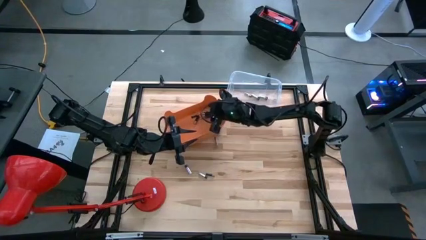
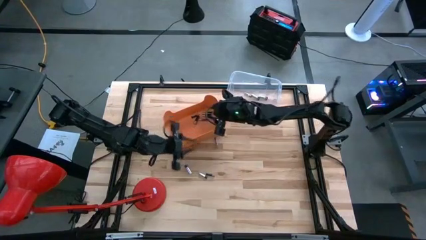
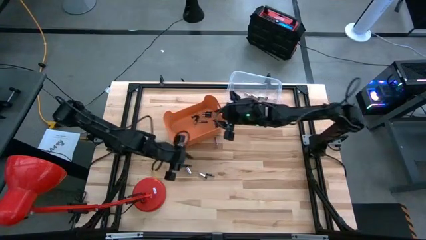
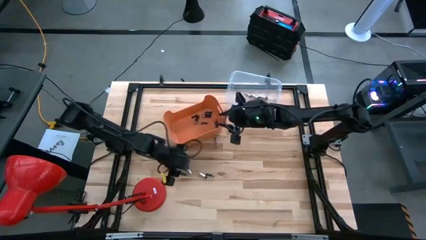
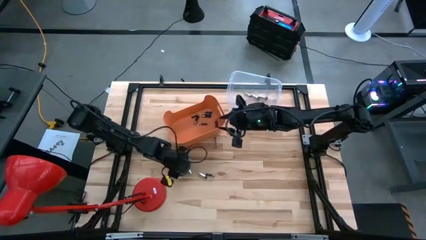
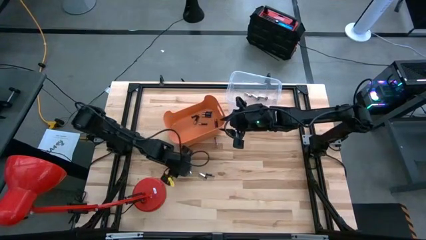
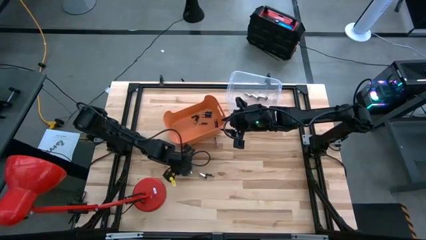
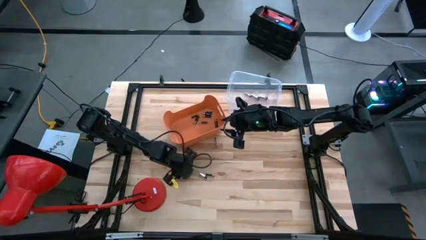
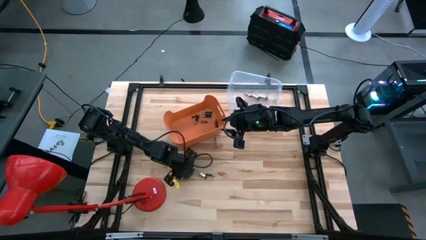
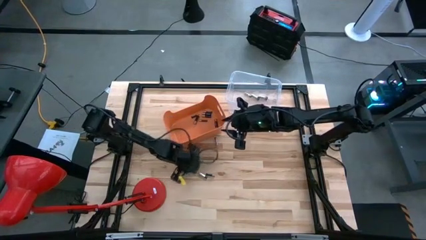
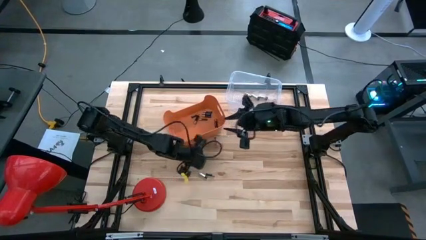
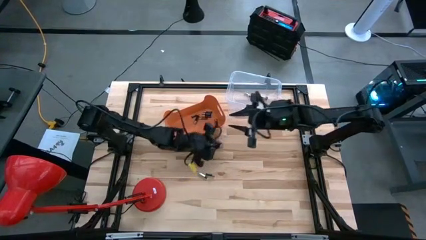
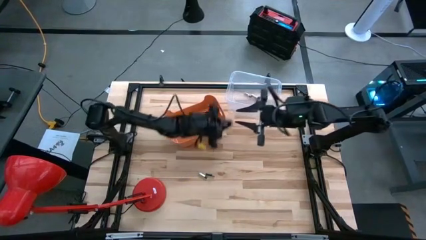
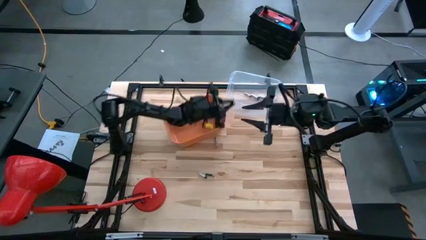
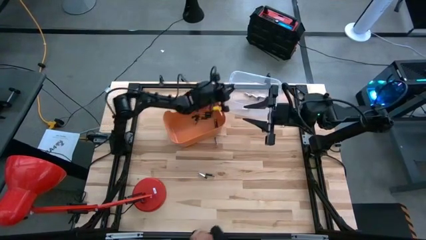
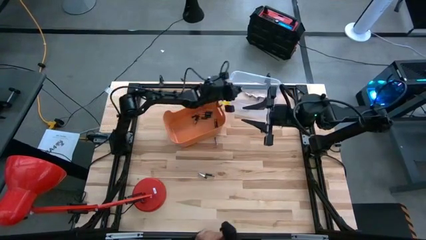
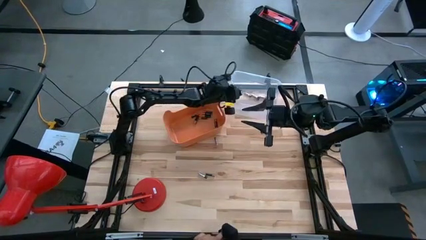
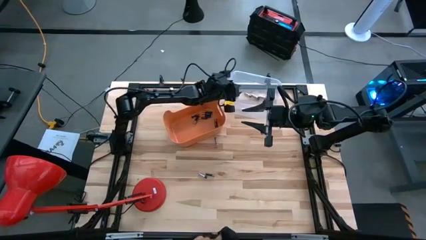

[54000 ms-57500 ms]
Task: Sort batteries
Put the silver battery into the transparent bin

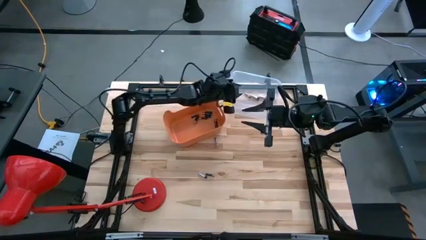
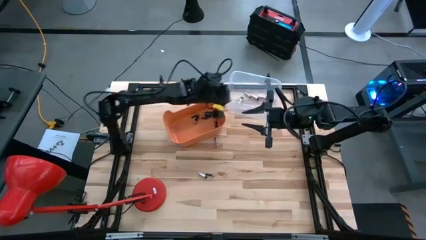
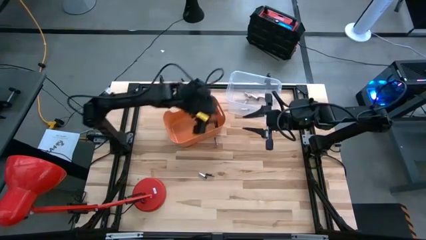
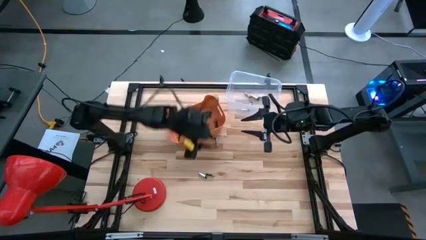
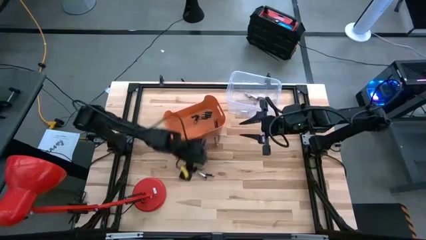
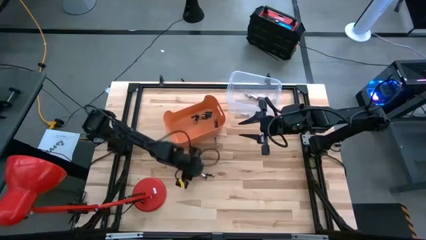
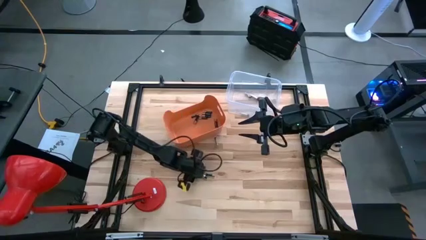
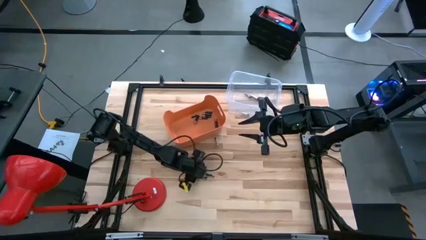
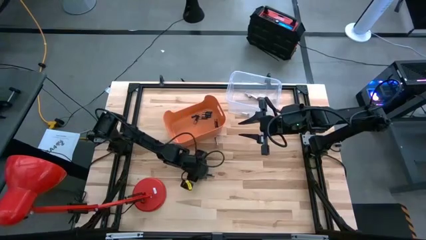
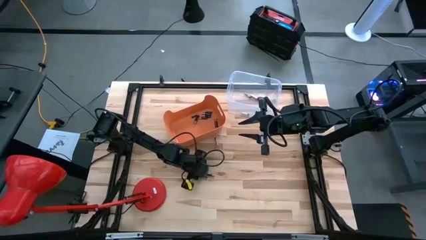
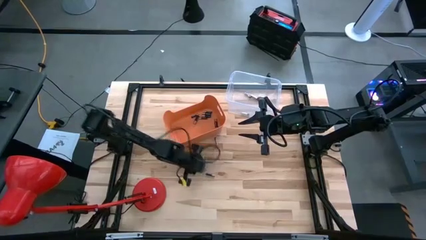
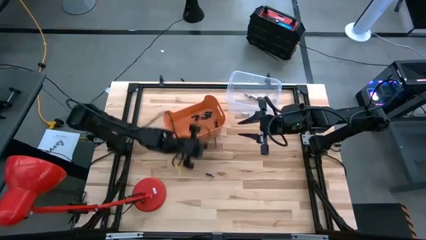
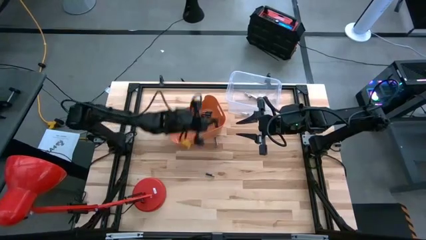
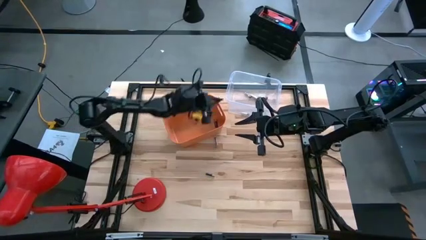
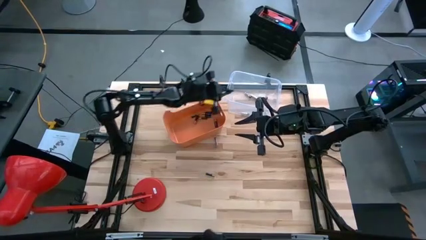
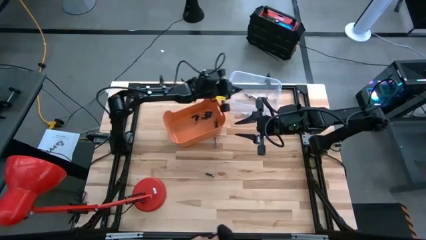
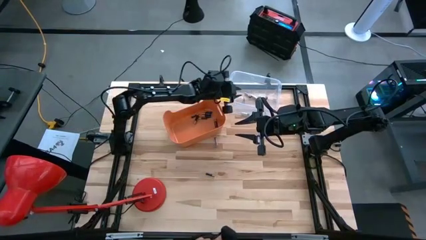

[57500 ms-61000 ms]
Put the silver battery into the transparent bin

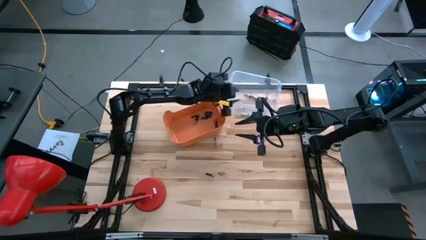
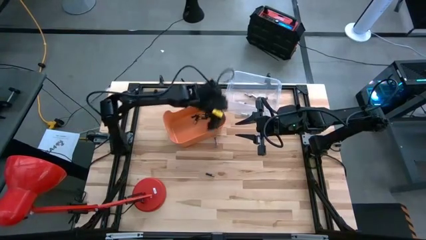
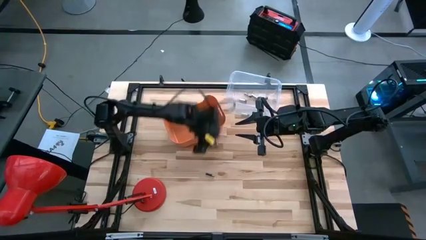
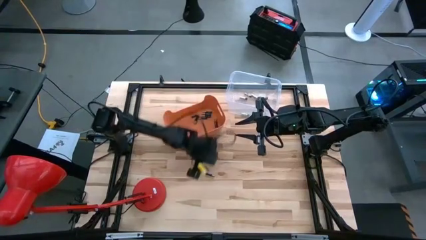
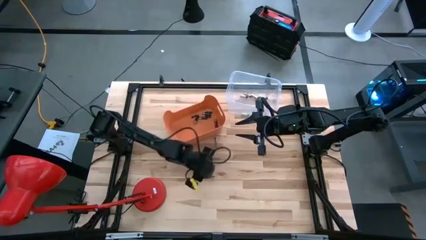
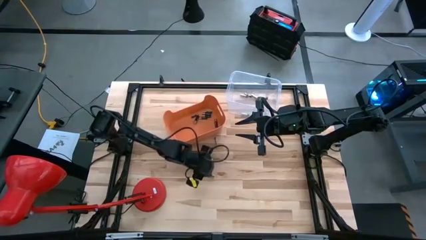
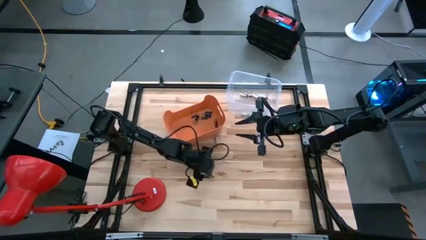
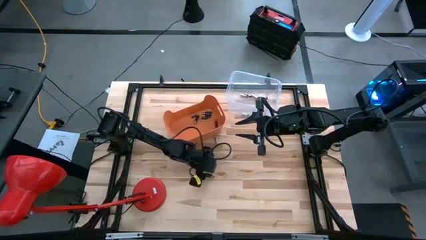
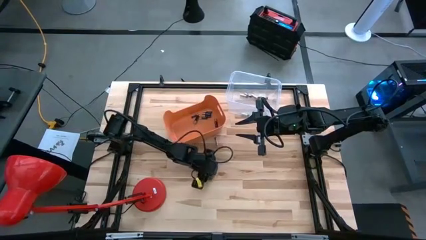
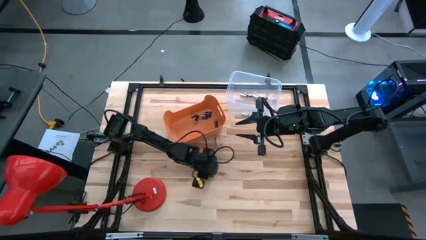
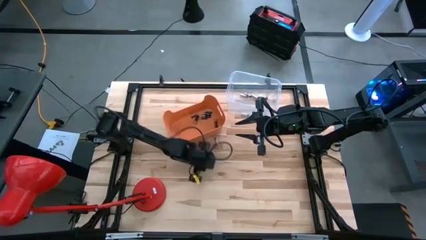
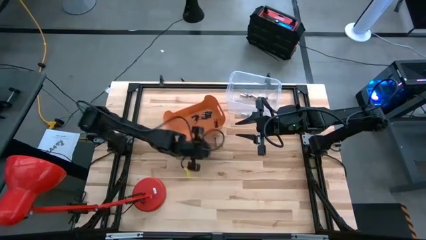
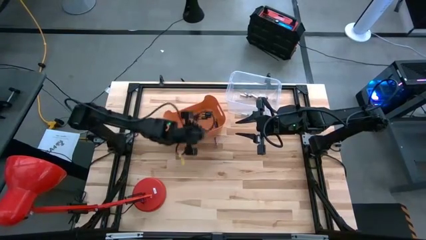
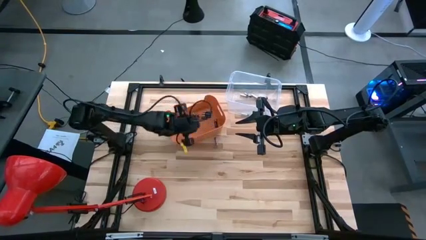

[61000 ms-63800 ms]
Put the black battery into the orange bin

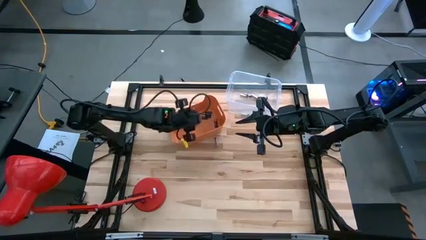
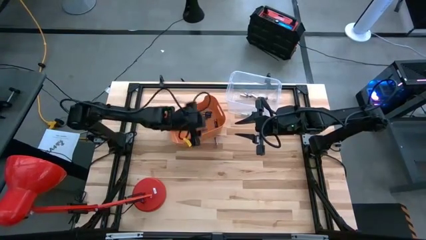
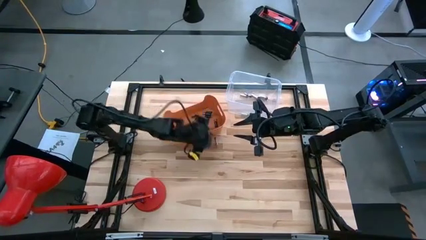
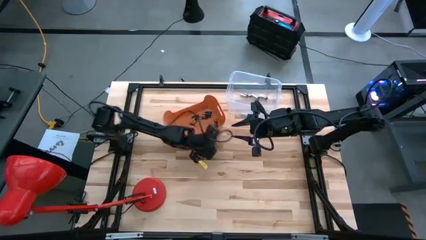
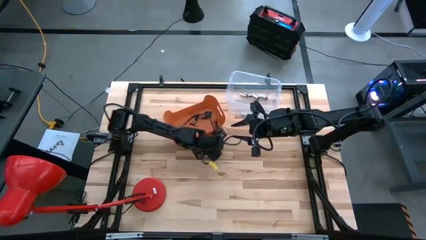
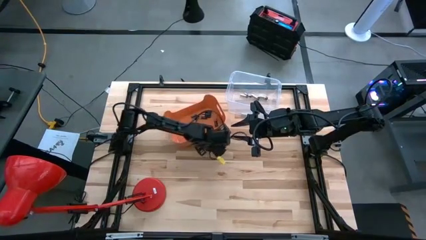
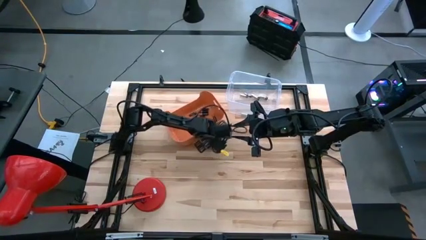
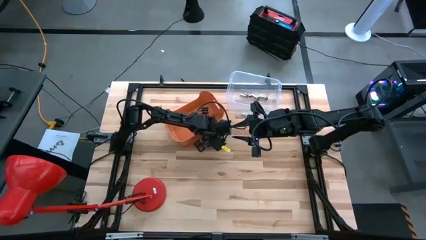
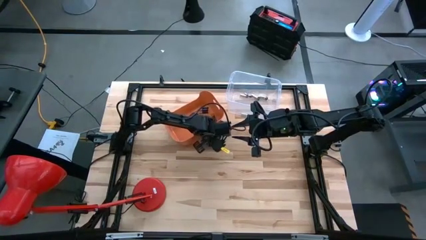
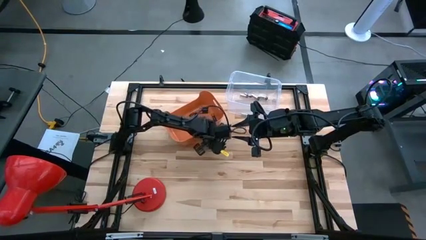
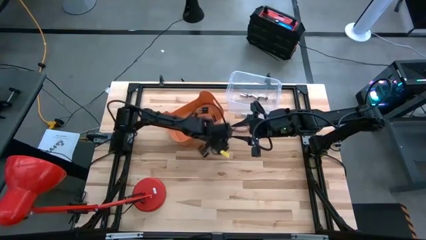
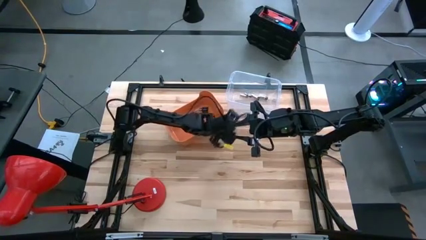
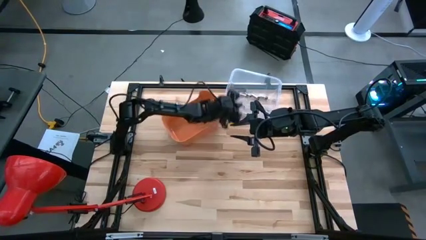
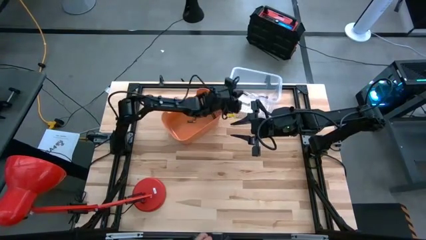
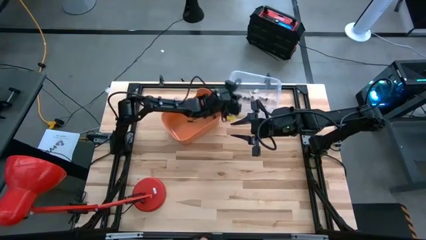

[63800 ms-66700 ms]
Put the silver battery into the transparent bin

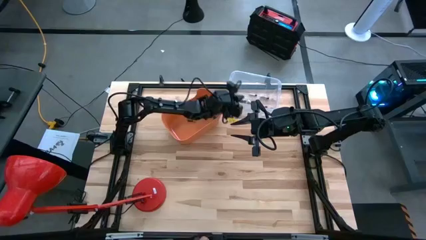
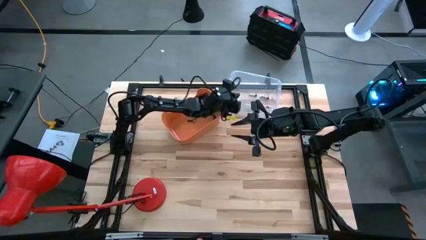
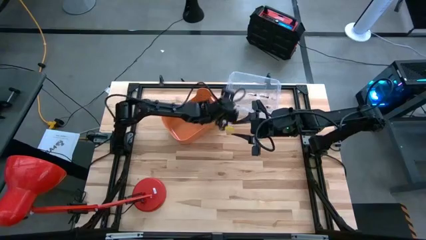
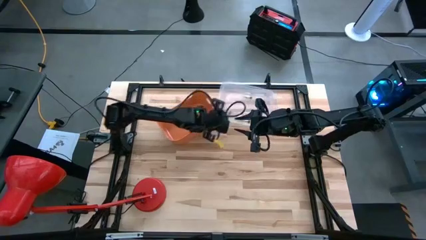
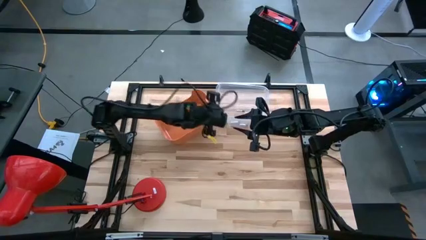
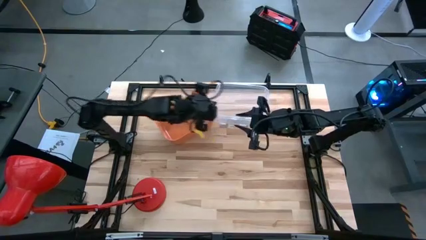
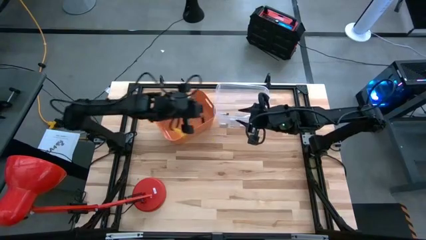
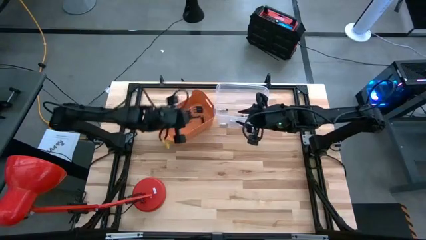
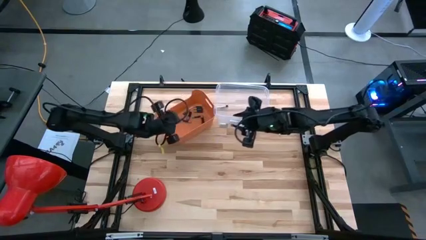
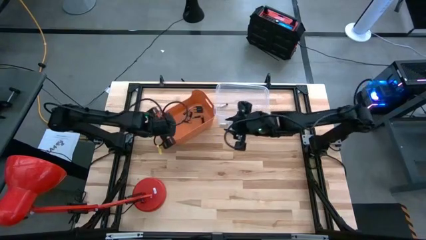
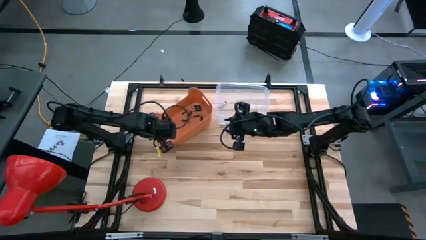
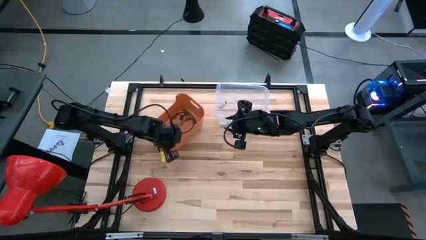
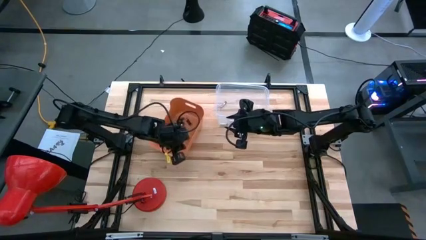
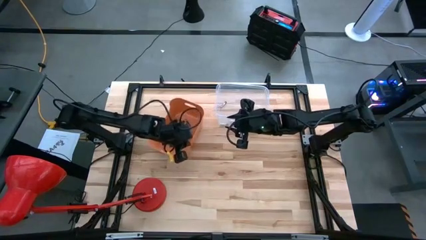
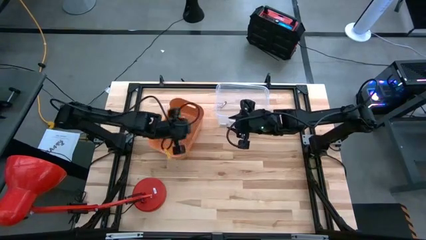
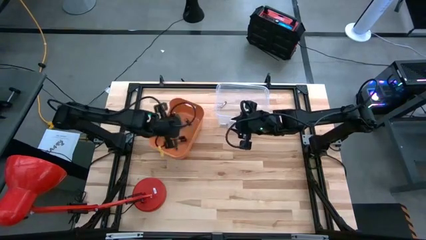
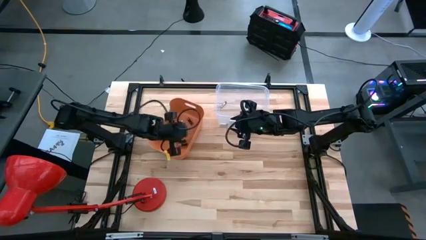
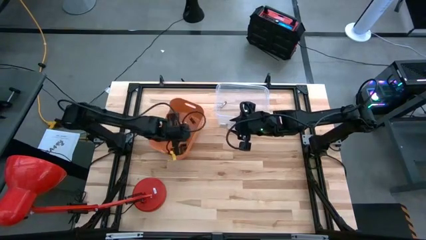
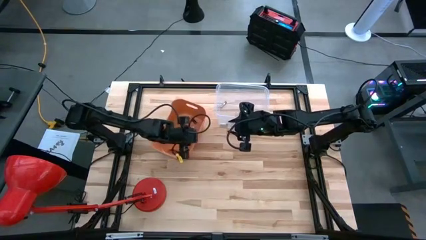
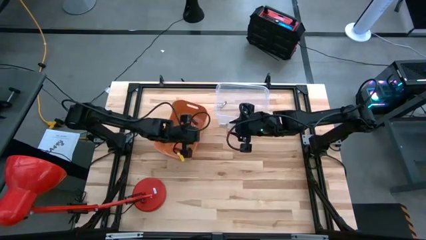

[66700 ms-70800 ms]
Adjust the orange bin
